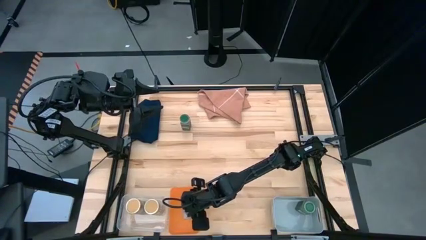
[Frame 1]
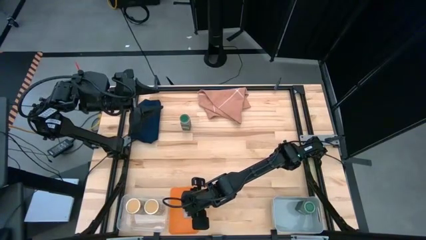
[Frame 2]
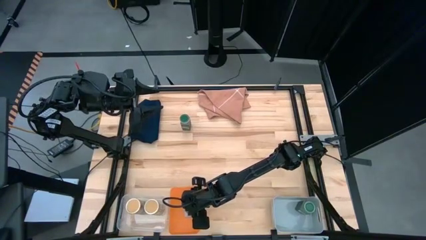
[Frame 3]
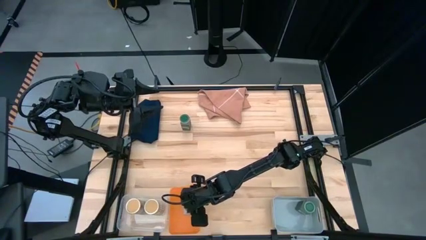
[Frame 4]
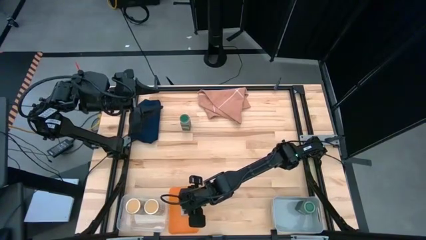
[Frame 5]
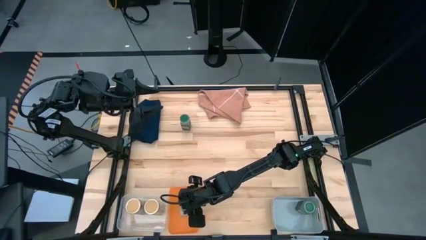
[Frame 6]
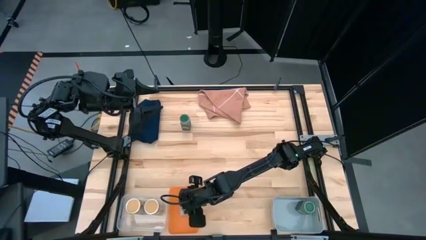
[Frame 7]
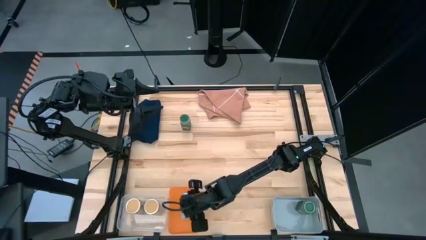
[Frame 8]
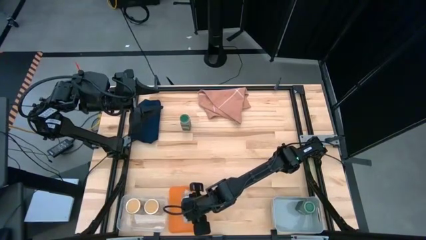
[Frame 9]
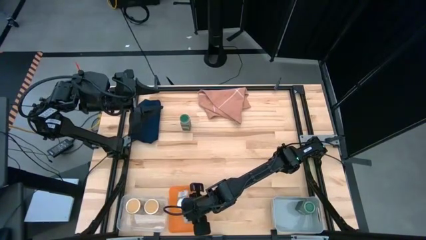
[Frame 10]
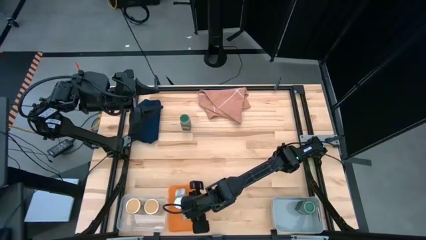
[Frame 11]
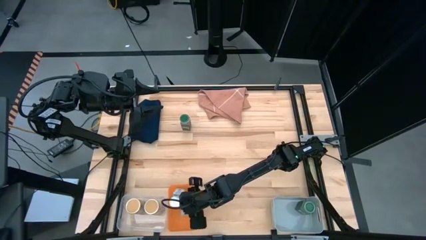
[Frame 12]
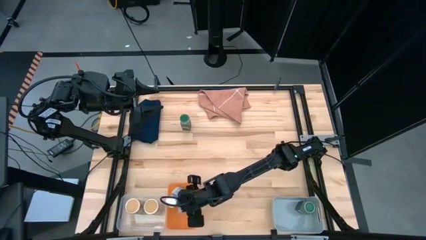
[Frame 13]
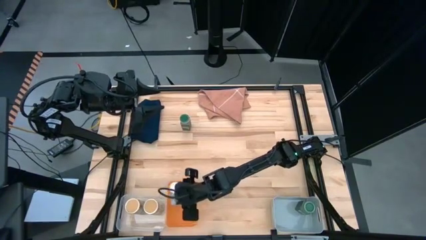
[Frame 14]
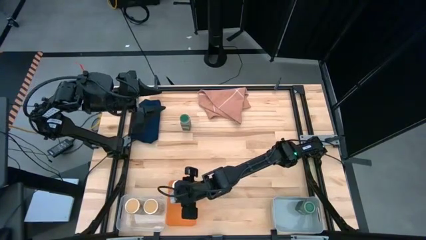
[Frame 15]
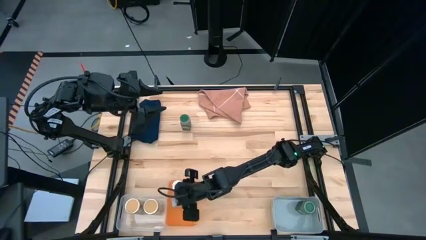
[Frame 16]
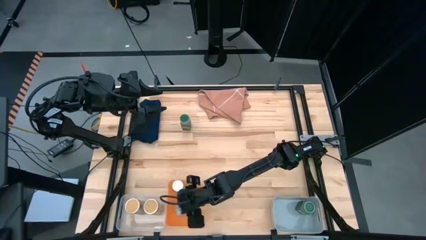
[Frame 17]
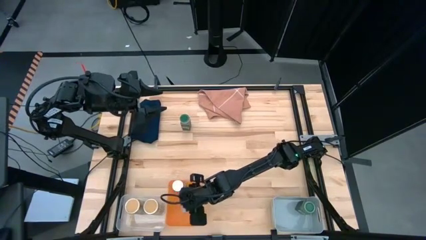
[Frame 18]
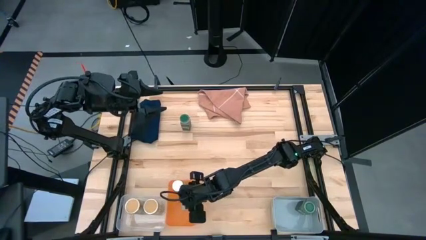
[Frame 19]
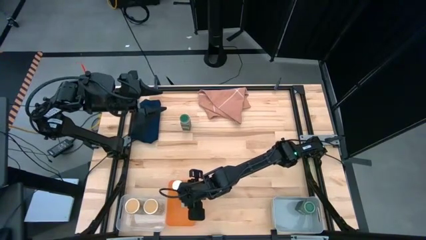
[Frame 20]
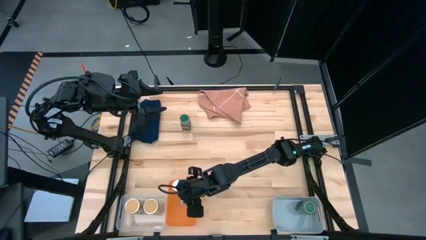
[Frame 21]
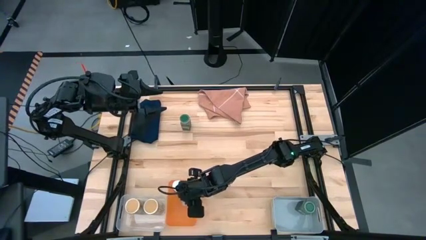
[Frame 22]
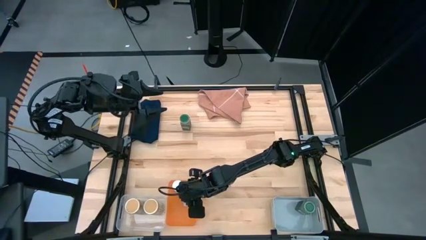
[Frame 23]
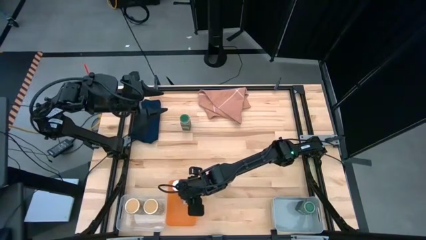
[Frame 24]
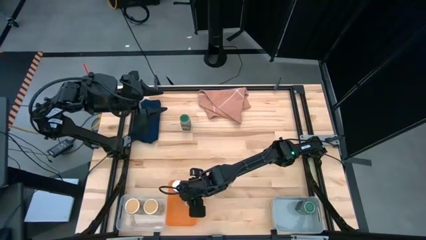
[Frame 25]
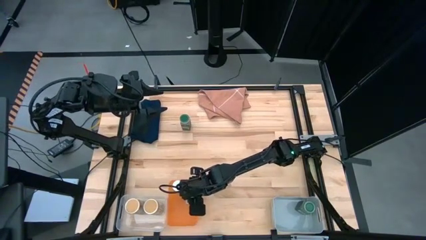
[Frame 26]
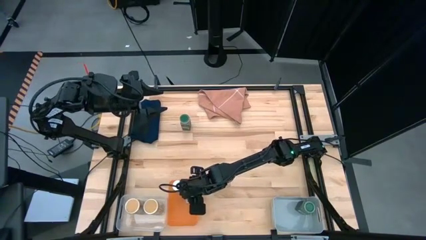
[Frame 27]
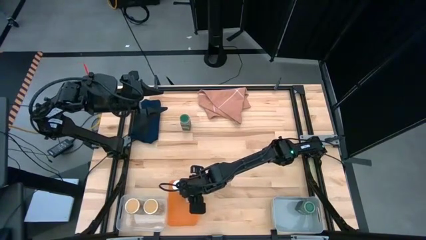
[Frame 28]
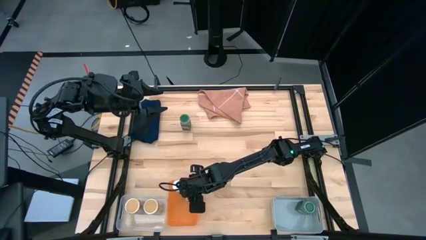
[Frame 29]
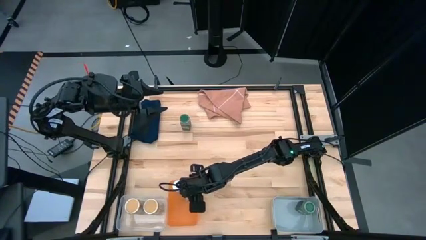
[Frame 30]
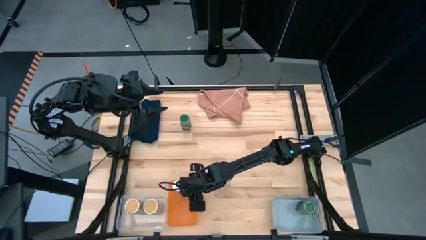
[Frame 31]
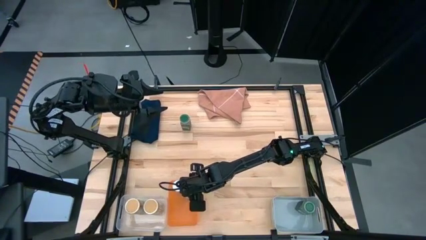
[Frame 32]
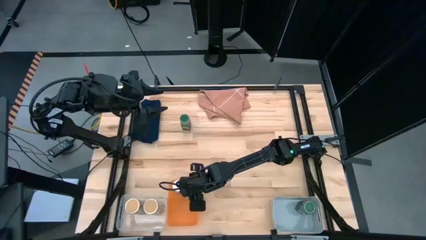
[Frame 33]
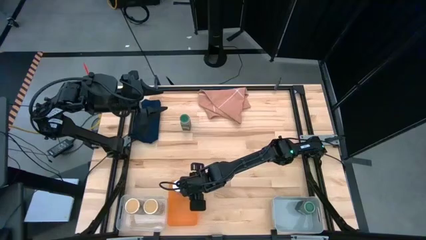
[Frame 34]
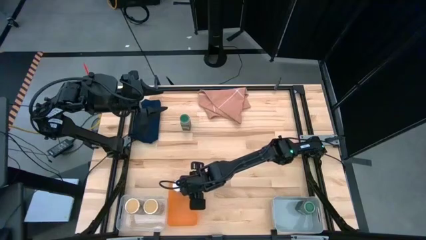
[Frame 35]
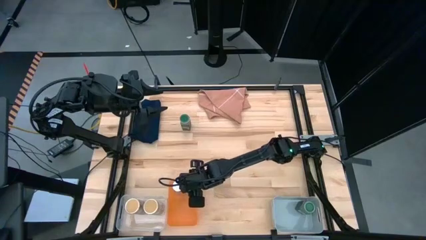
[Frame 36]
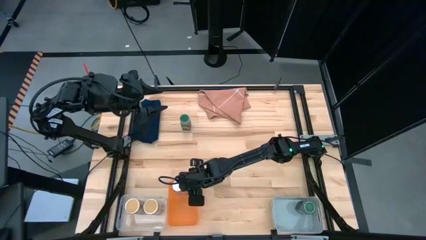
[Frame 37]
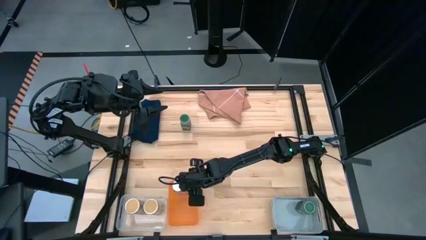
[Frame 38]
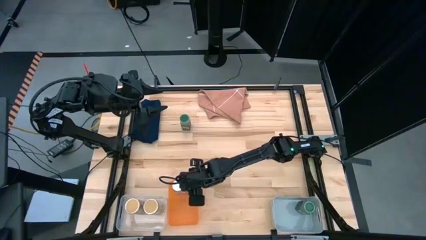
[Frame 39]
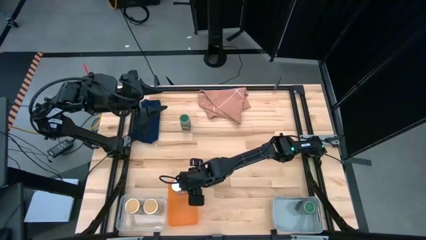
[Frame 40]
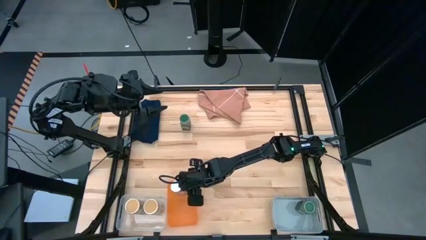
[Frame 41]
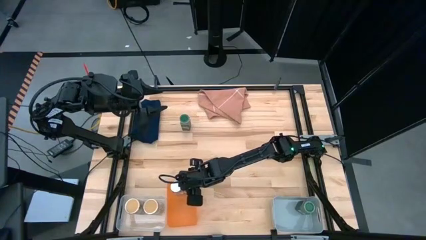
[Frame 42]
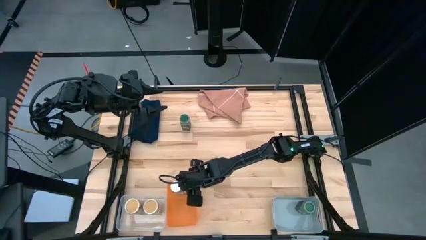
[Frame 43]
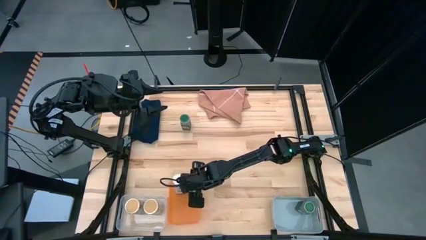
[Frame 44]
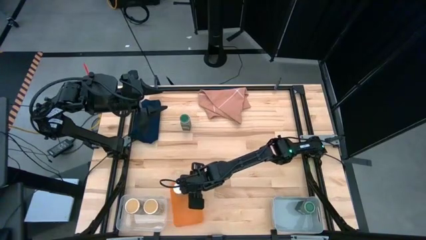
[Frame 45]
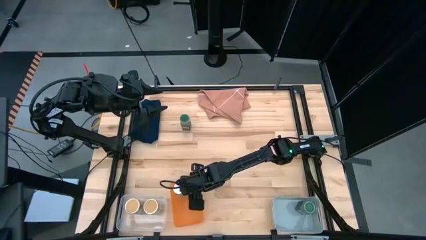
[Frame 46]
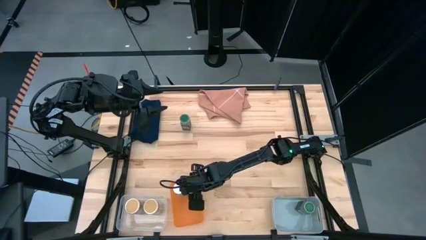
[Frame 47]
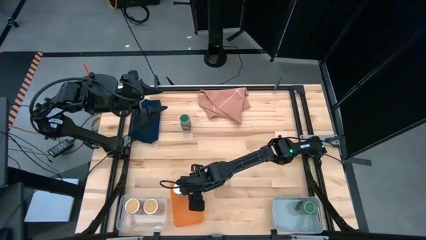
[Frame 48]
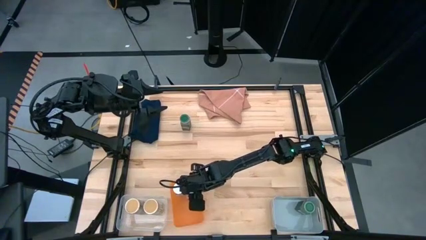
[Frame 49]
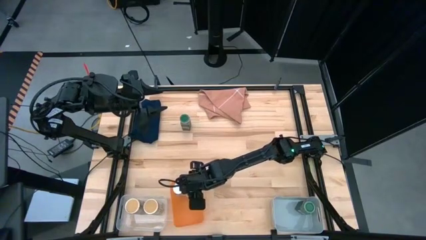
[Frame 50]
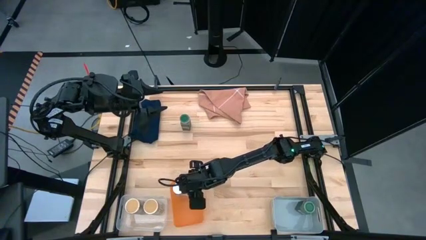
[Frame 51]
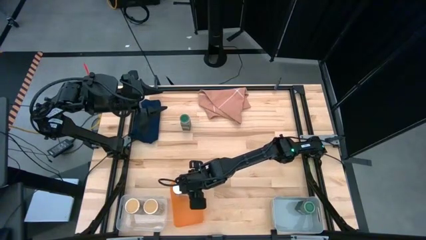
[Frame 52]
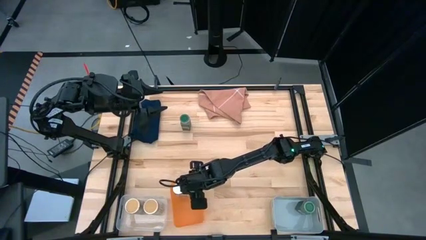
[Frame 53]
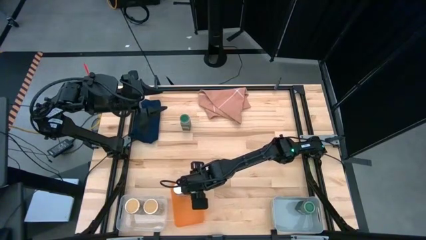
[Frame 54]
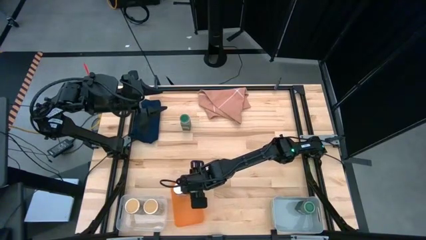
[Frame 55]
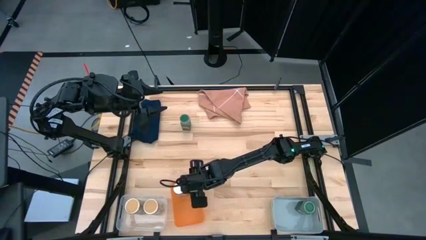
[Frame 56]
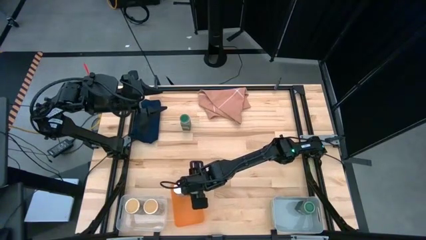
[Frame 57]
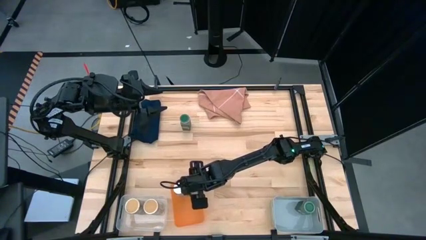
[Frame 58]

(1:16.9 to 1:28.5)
Task: Sort spices by type
Put the white seasoning bottle into the orange bin

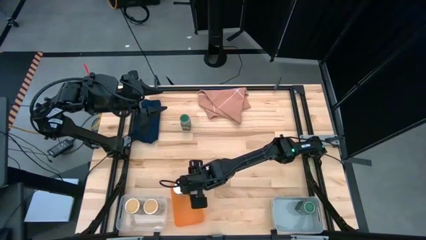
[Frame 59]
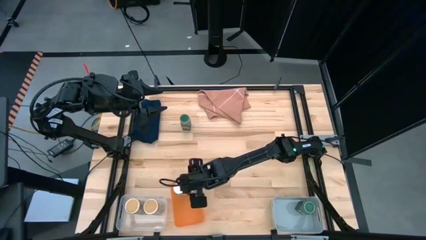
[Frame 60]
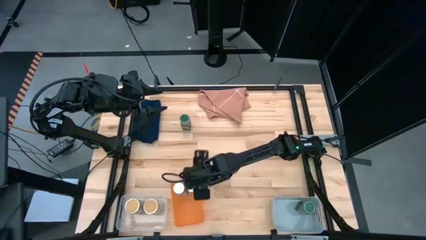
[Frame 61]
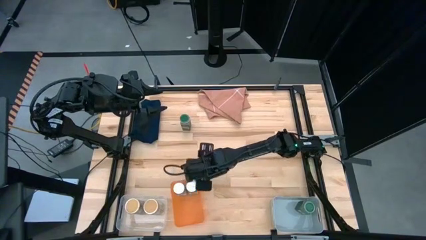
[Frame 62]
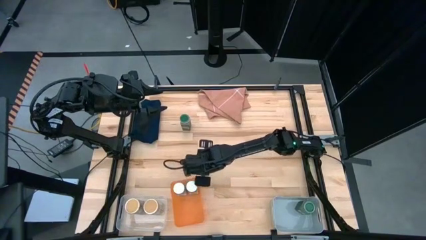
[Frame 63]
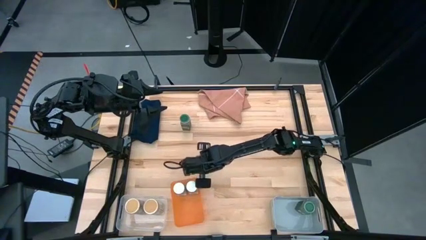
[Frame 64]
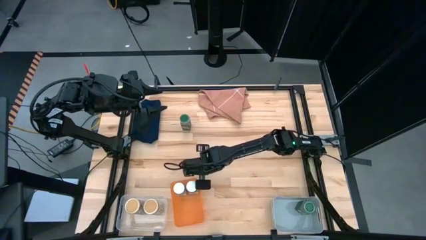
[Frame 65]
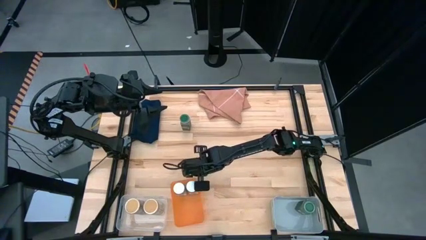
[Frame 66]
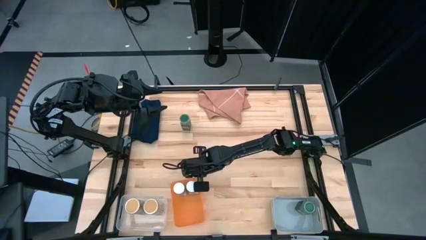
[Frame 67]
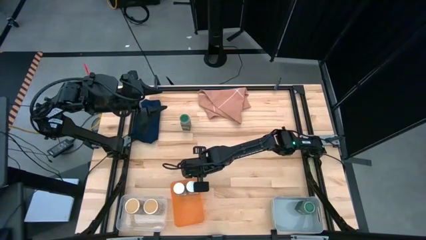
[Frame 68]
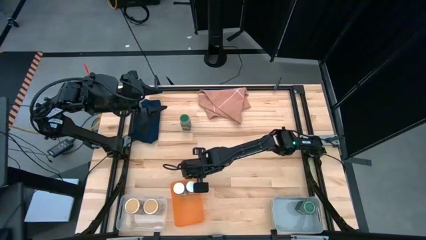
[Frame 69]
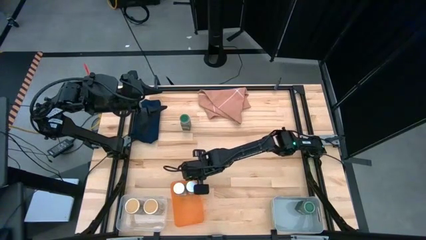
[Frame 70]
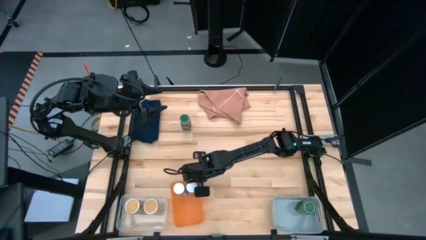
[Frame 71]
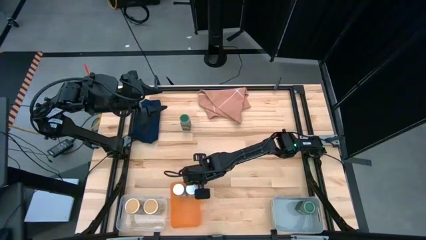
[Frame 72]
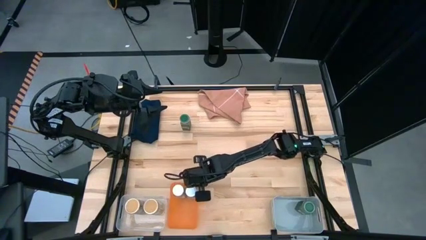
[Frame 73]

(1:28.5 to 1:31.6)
Adjust the orange bin
